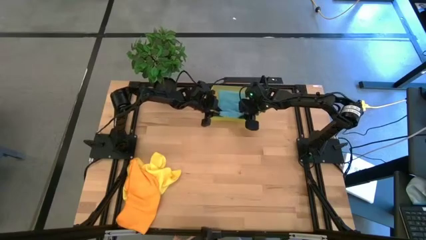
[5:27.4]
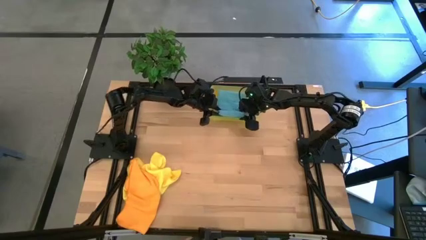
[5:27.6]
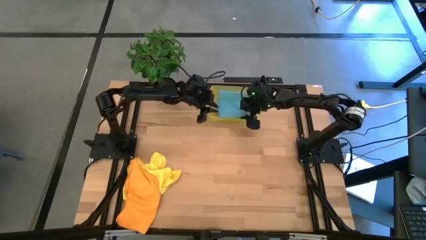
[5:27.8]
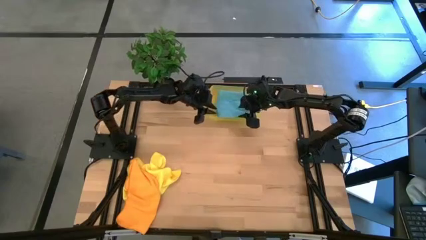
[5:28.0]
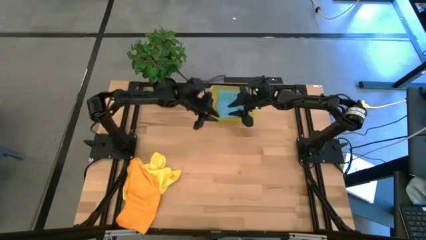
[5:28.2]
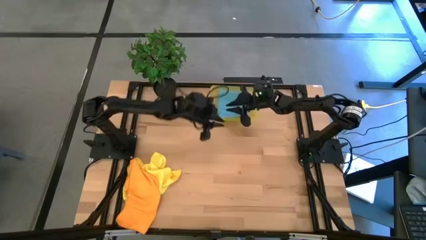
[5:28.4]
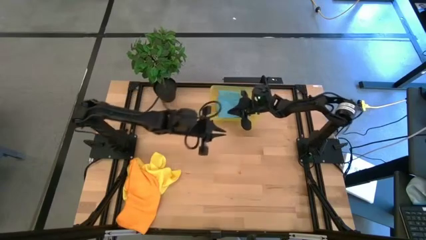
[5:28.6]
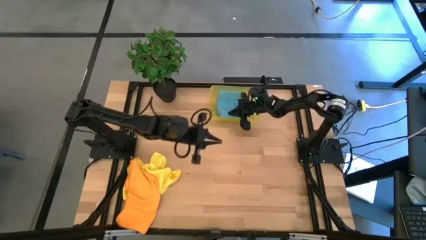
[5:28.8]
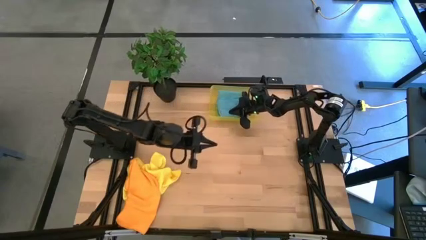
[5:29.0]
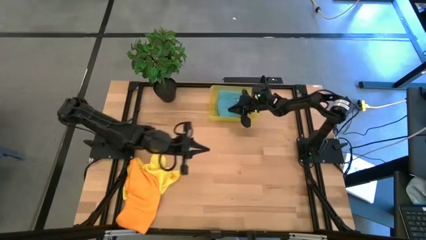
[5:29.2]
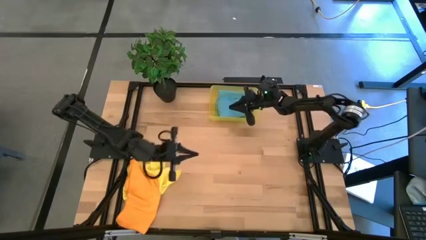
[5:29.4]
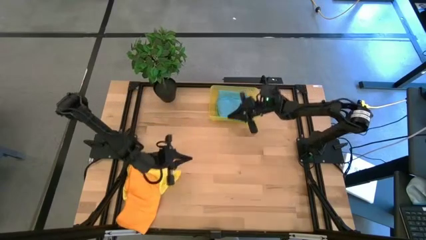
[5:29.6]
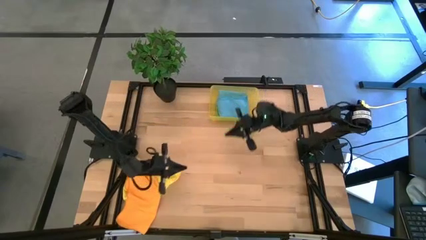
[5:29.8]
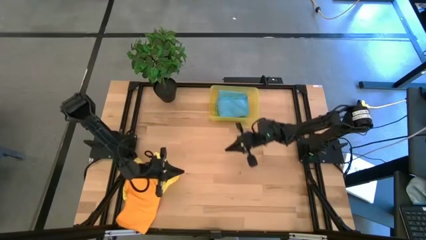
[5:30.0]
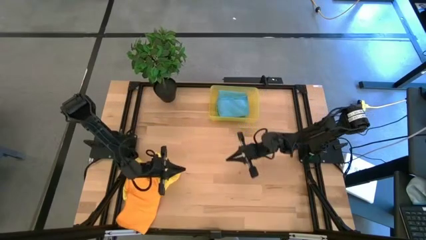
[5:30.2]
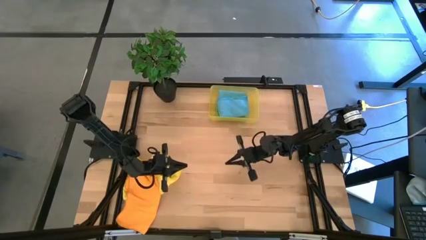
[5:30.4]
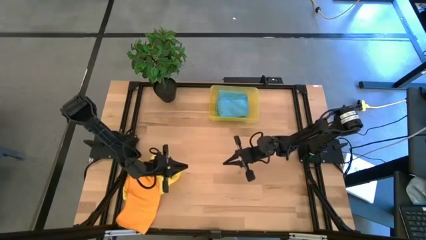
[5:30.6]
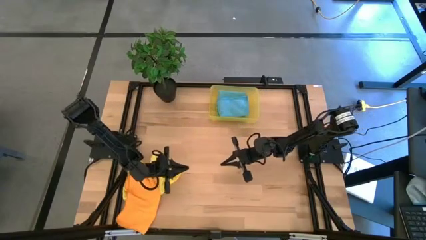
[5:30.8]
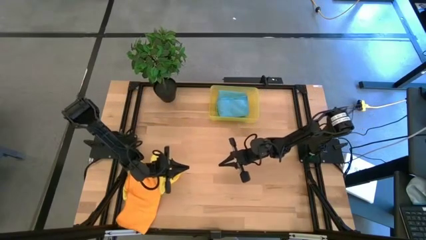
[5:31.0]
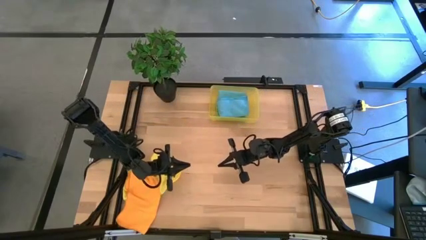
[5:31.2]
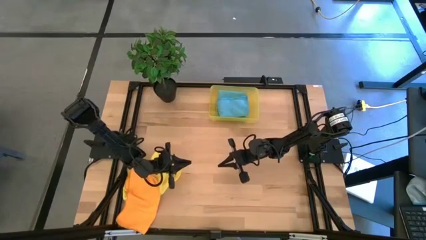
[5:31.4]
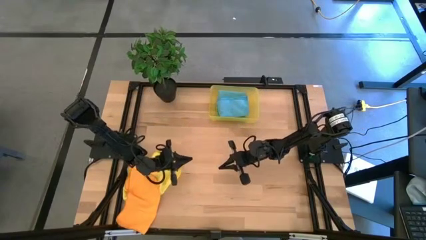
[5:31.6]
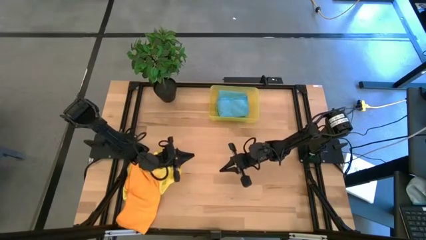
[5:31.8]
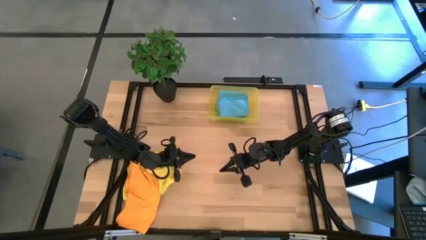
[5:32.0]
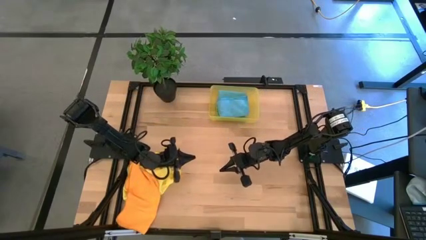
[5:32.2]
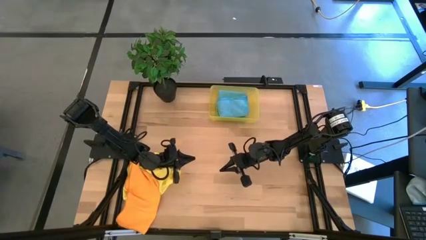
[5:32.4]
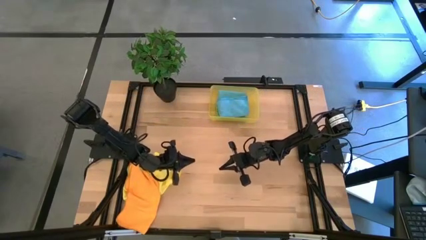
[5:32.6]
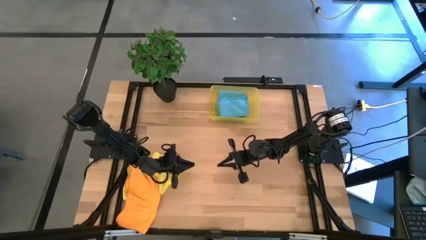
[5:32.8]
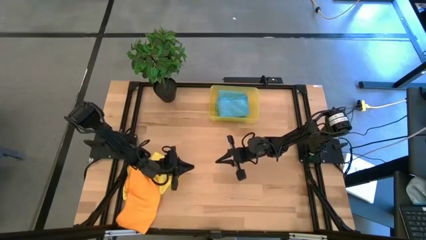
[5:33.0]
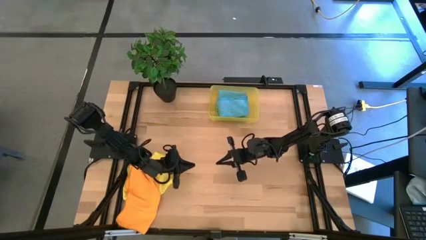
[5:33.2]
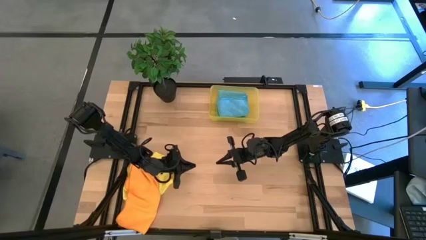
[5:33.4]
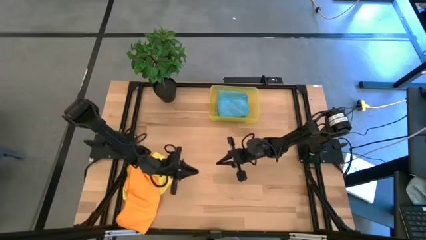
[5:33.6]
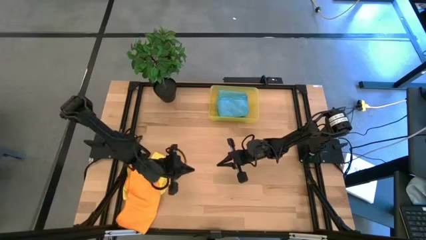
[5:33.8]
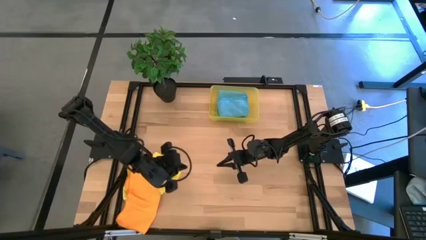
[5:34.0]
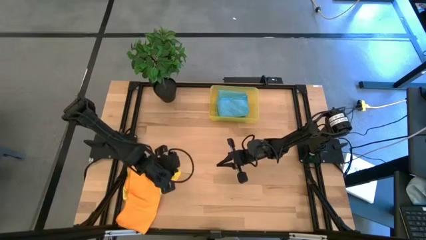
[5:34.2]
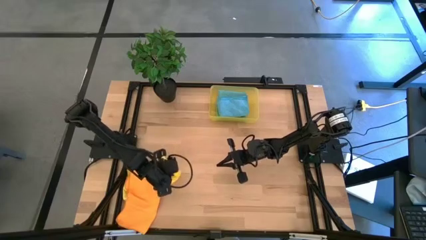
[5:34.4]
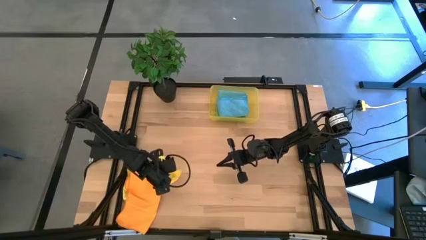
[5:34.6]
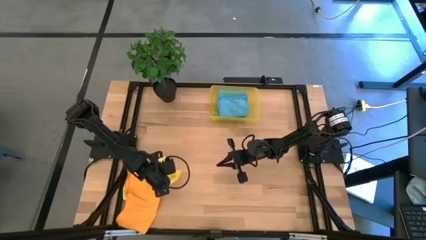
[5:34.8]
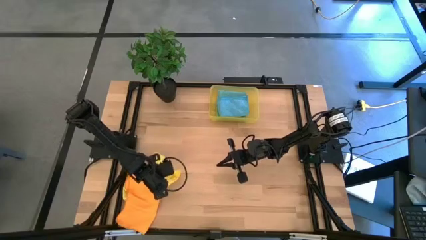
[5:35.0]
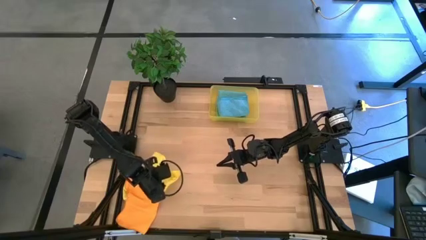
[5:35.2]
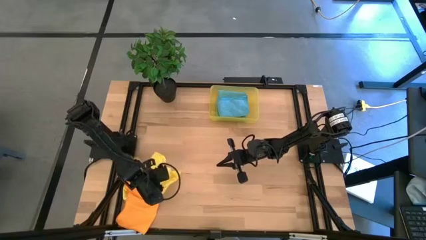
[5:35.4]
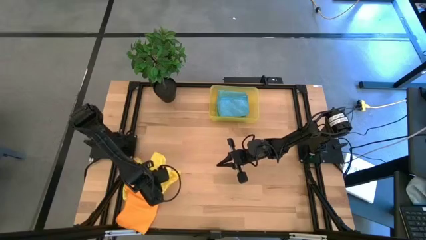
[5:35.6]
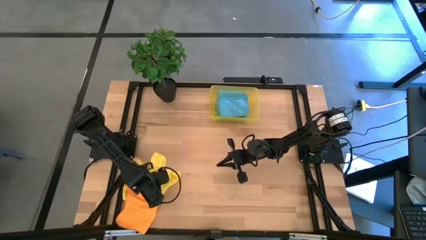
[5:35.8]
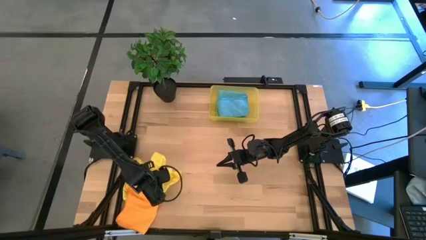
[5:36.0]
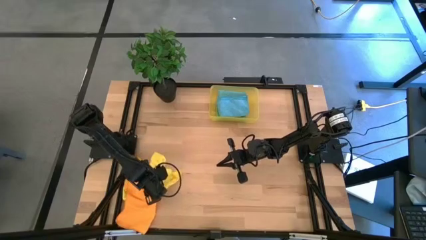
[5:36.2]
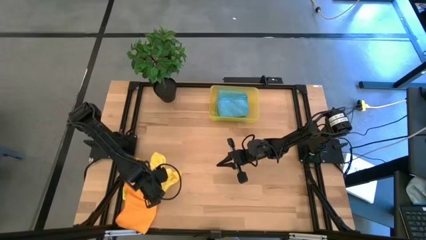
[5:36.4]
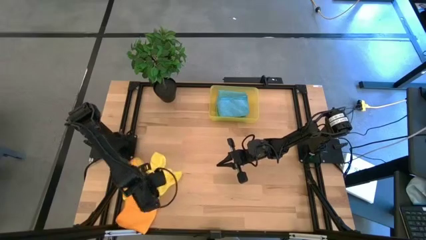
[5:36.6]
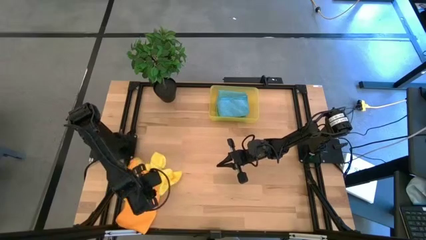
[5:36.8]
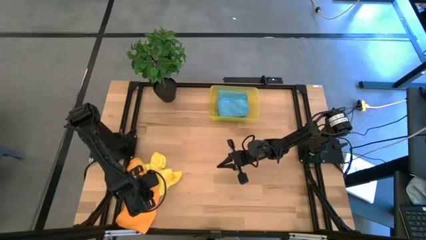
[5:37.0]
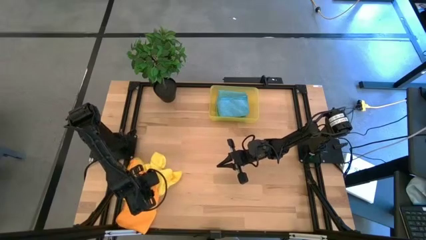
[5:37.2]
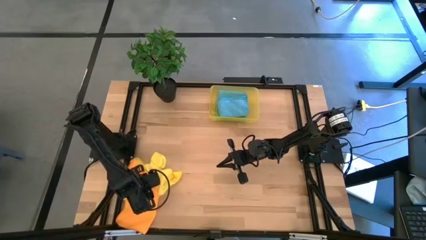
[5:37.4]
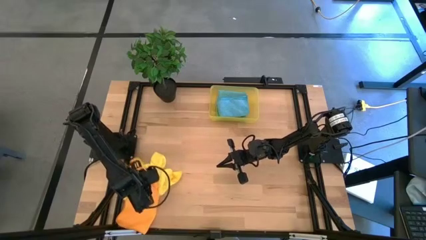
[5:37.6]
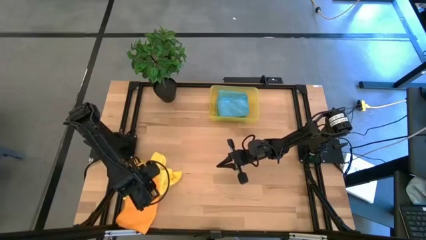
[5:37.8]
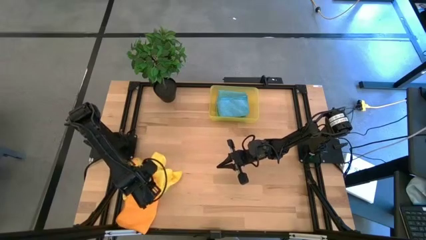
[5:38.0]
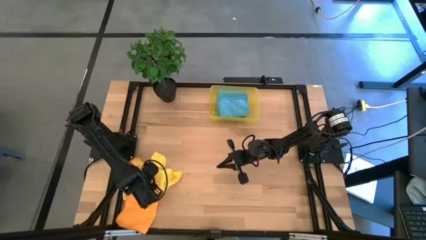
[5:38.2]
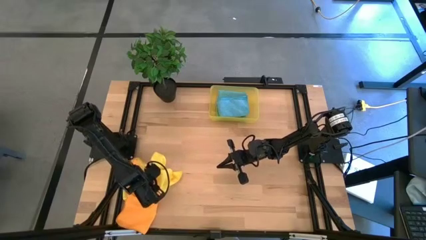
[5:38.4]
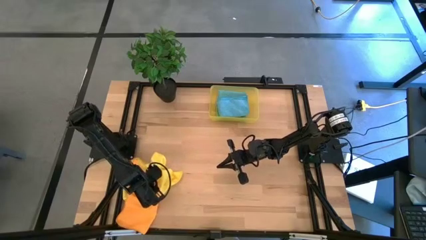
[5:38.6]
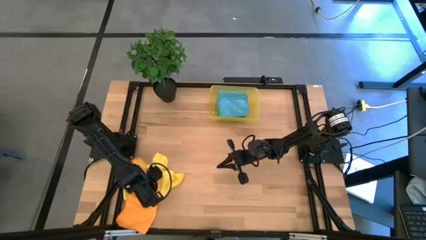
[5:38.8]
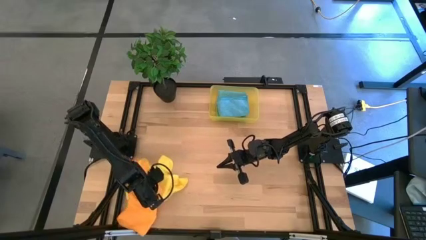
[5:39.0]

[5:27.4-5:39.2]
Task: Fold microfiber towels
Fold the orange microfiber towel
